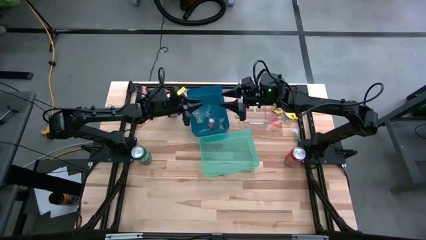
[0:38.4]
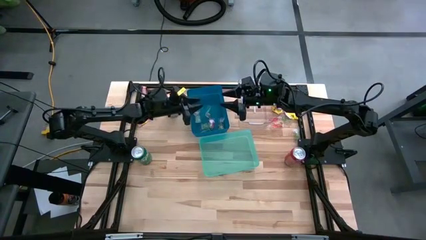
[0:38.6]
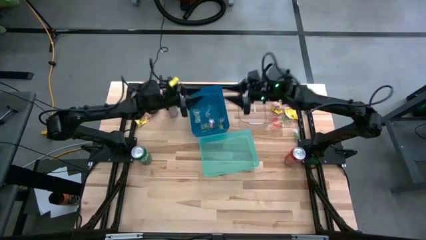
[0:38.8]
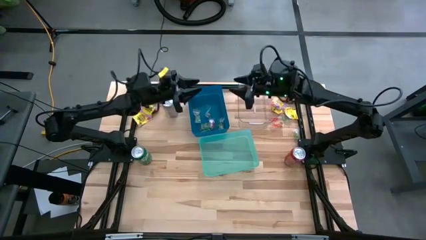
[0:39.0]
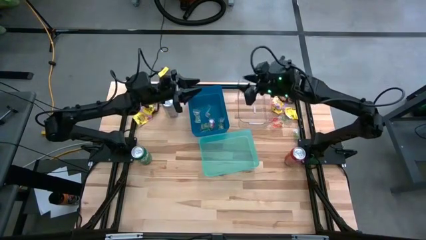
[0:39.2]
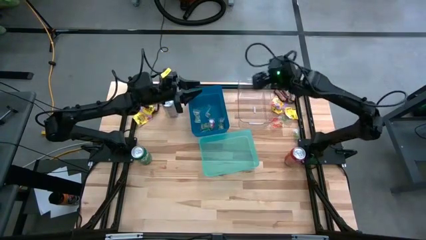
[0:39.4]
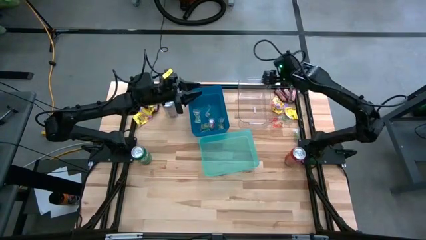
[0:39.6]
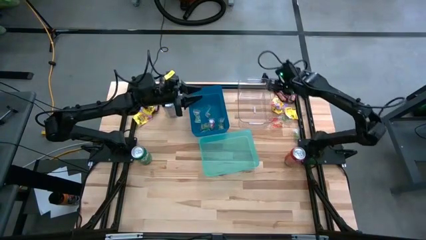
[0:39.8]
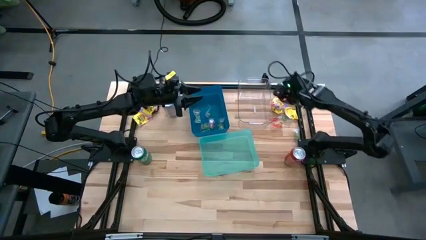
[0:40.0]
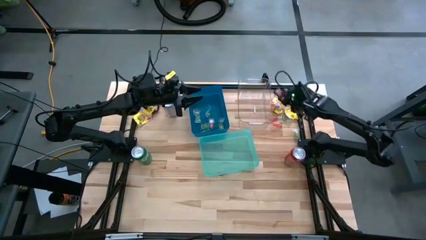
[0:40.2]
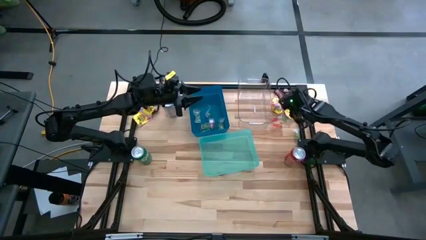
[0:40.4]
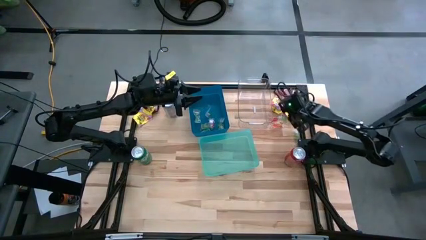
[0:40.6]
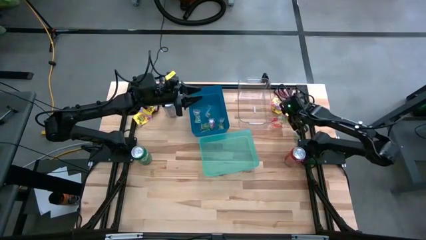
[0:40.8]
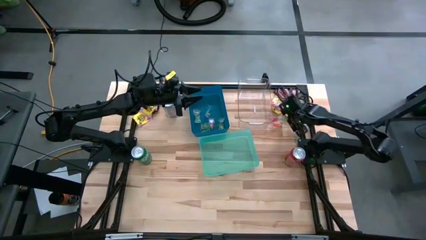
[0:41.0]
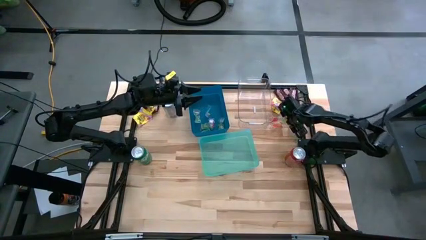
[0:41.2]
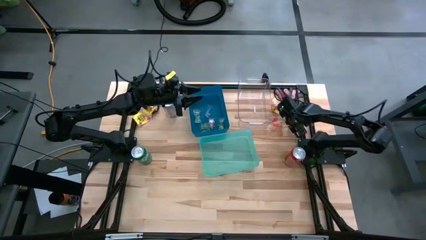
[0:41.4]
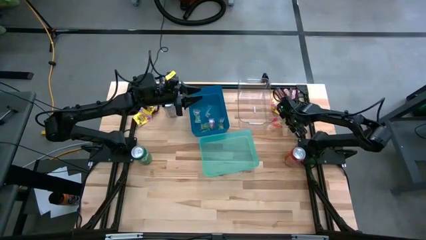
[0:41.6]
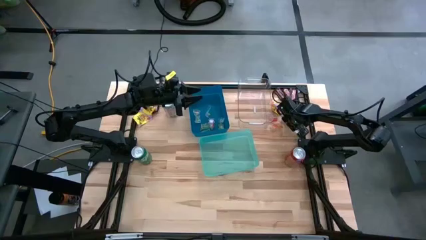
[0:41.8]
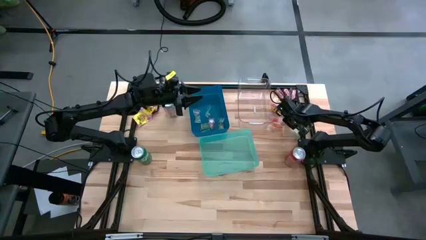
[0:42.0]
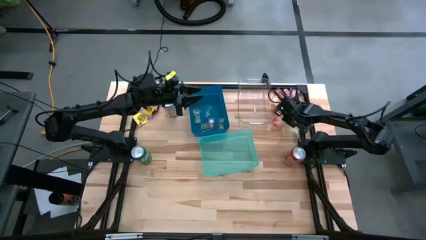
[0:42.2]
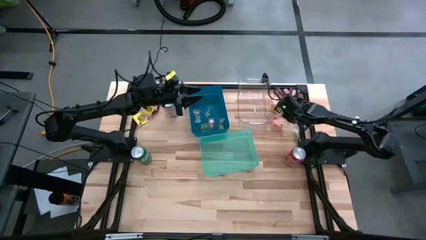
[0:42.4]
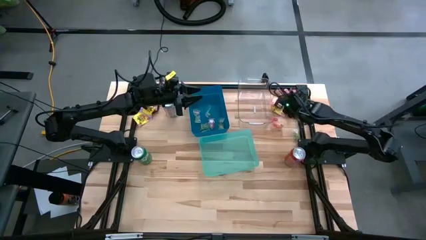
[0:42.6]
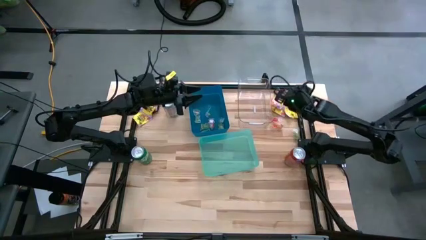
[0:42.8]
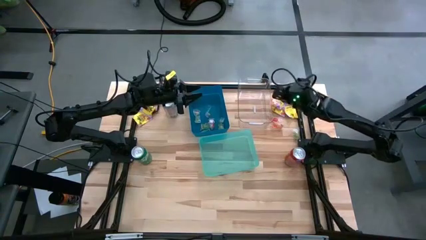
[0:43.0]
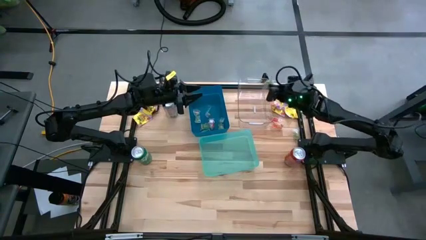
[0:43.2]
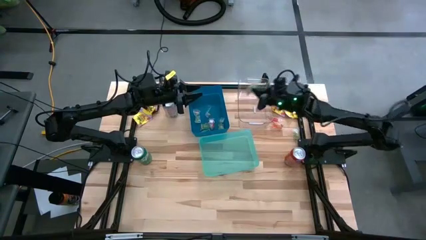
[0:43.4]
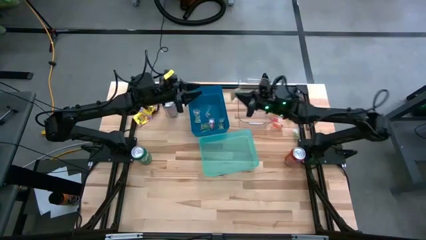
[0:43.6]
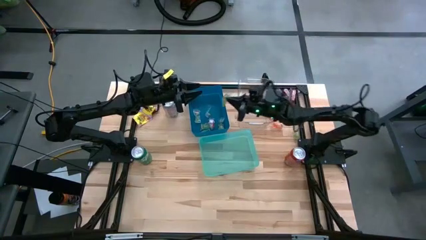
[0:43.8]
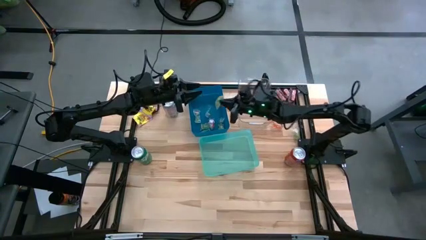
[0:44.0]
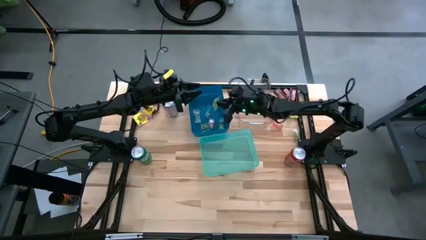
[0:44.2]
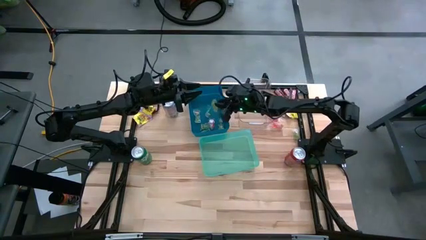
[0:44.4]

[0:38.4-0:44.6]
Task: Sort candy
Put the green candy into the blue bin

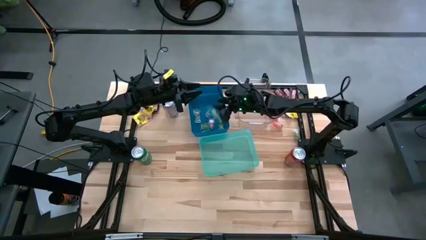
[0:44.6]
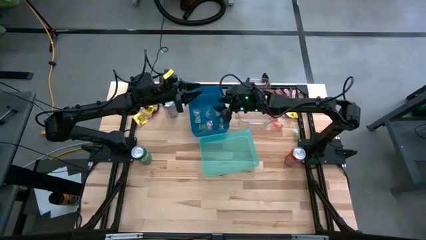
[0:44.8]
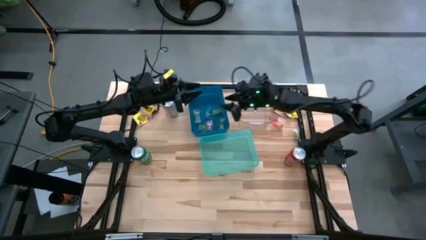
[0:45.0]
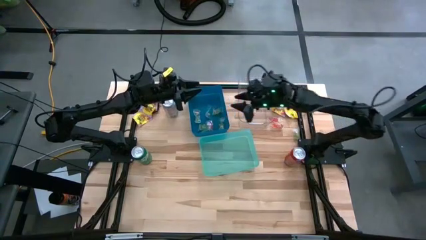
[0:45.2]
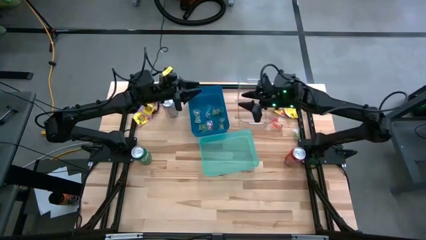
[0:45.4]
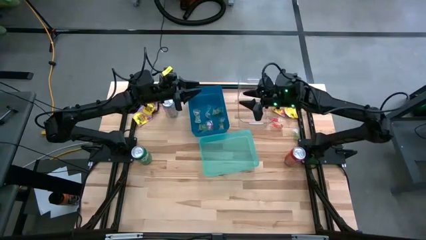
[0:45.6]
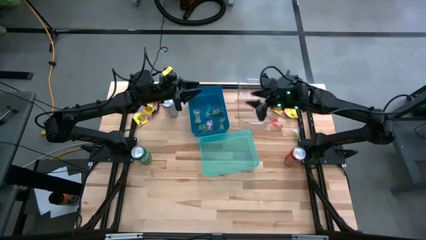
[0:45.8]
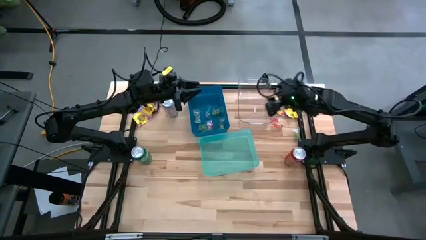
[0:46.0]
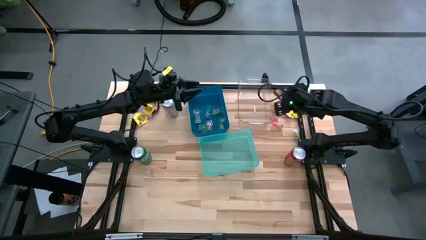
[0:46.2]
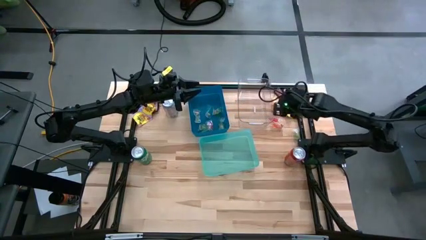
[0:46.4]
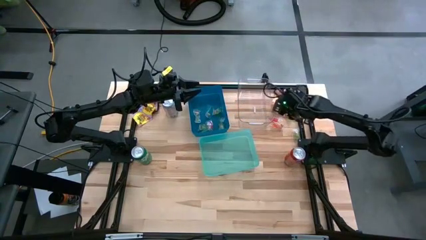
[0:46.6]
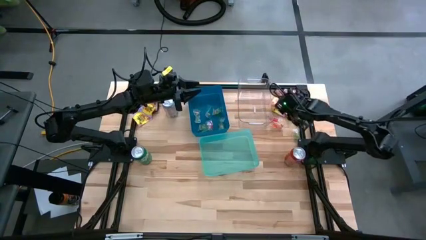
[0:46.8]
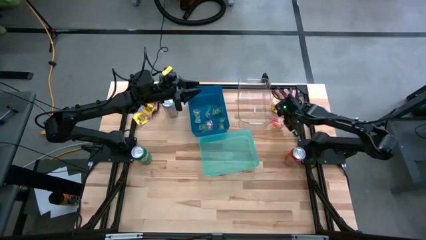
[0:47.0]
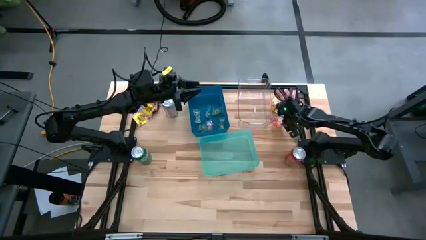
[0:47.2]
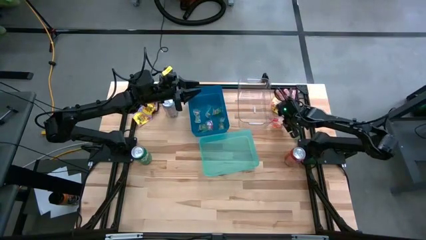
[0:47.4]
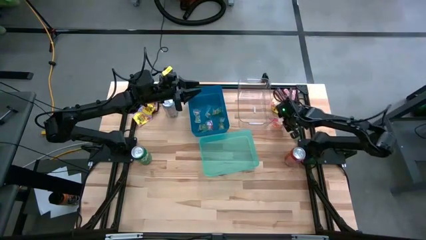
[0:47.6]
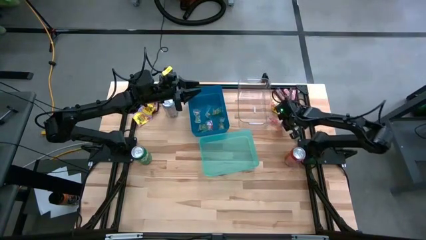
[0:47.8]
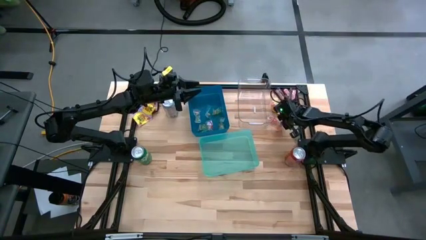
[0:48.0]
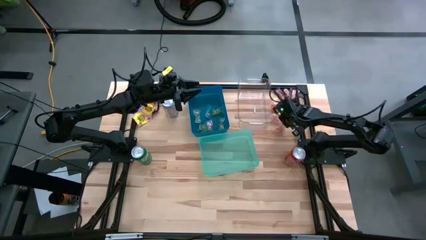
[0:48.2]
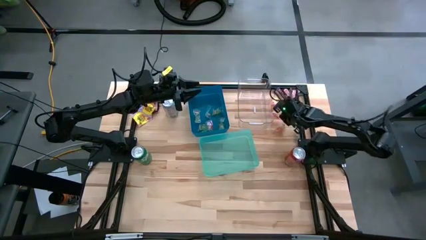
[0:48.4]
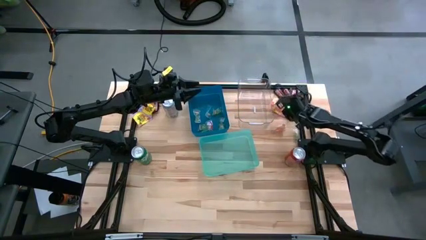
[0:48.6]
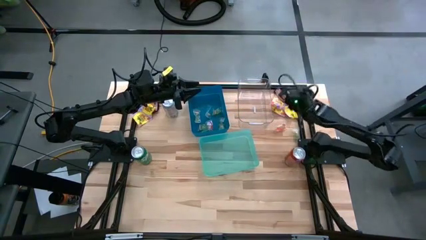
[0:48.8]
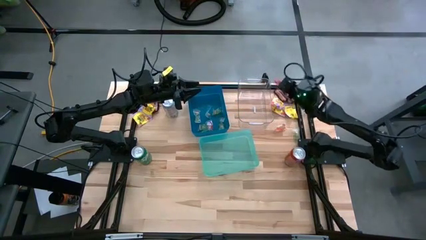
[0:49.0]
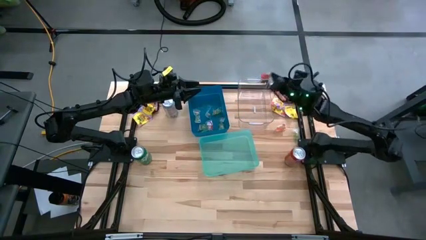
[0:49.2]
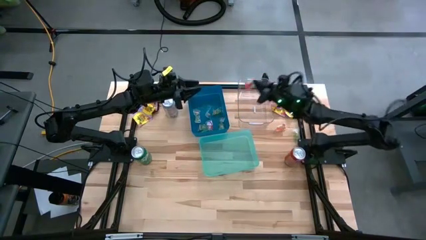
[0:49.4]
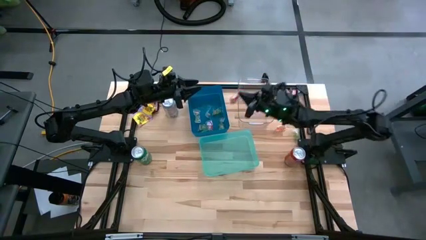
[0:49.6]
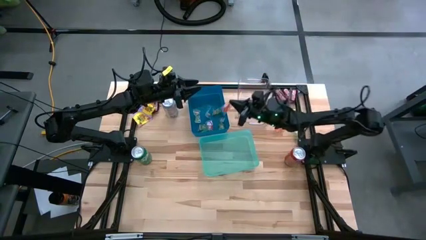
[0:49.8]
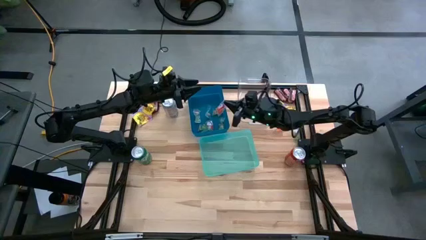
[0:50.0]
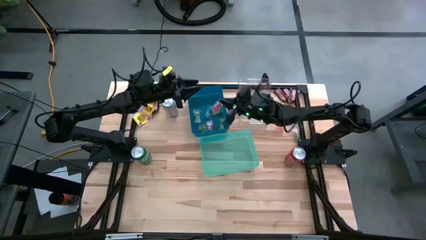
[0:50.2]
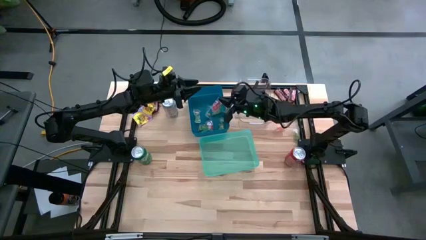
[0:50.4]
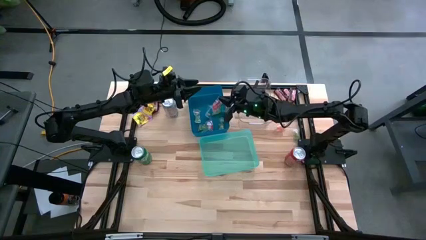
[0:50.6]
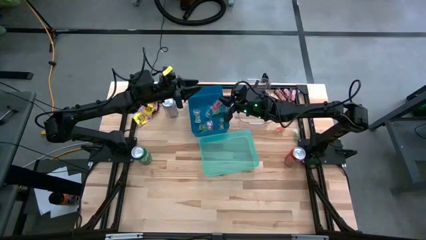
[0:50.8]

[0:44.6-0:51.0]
Put the orange candy into the blue bin

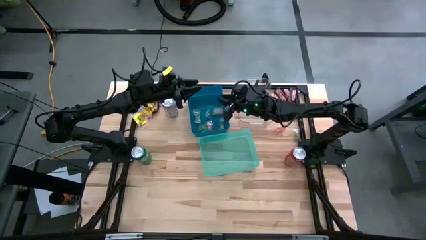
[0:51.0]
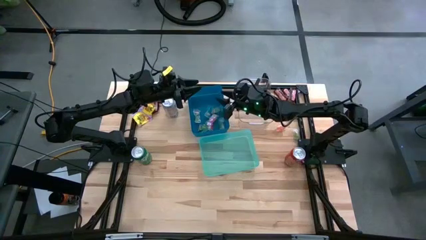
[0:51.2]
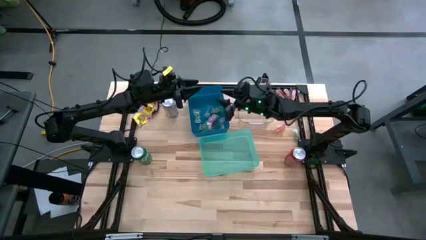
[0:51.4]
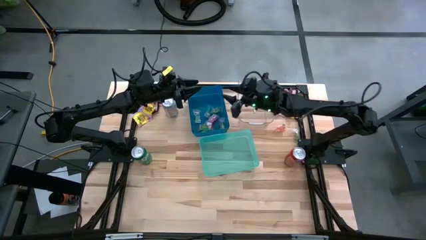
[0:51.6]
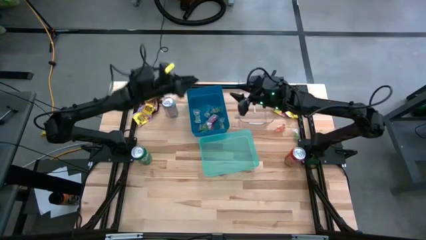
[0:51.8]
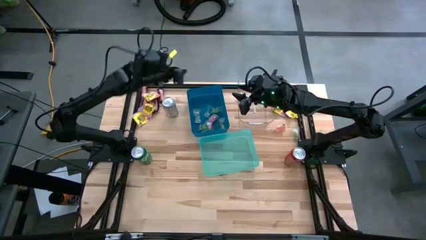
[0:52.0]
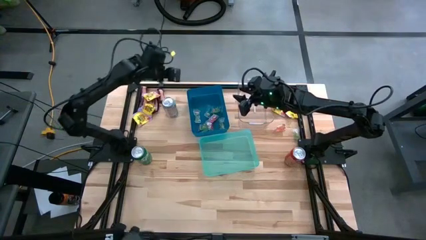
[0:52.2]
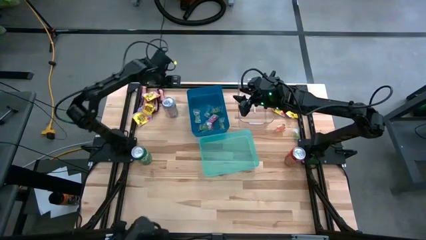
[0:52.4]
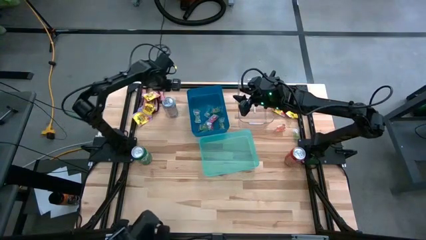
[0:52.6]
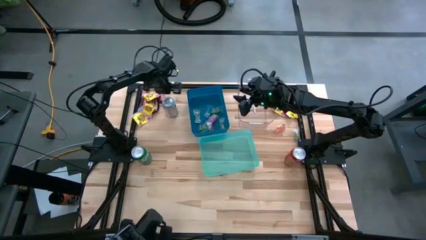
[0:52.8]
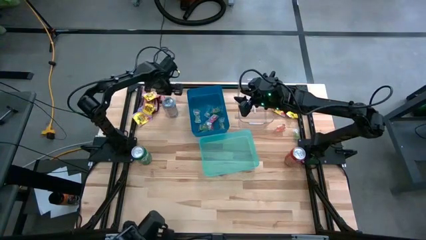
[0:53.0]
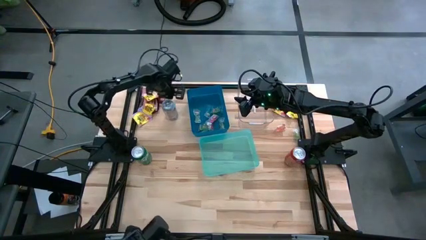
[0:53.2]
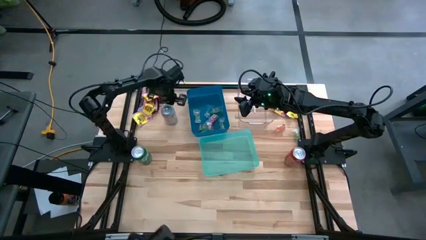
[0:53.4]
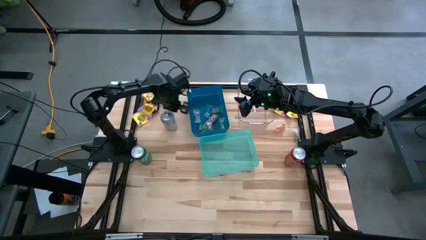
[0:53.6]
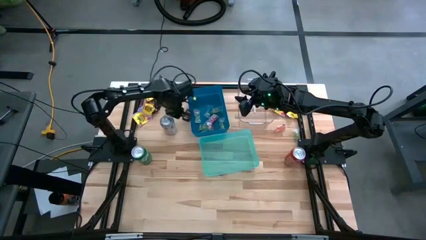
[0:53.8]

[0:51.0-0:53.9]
Adjust the white soda can

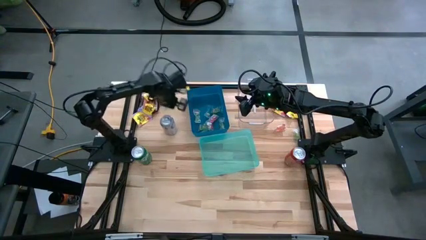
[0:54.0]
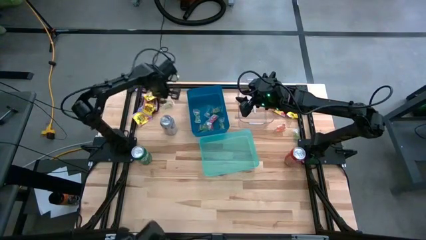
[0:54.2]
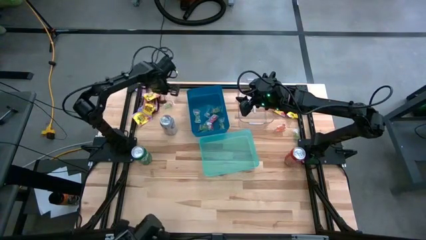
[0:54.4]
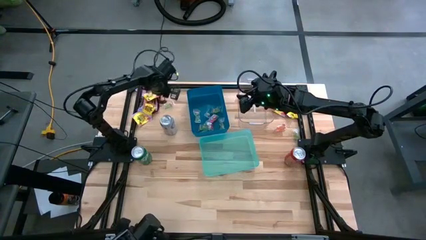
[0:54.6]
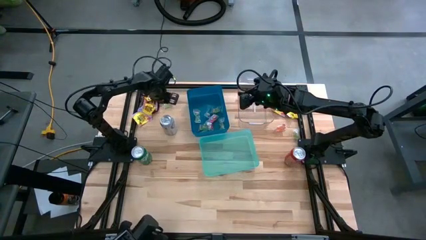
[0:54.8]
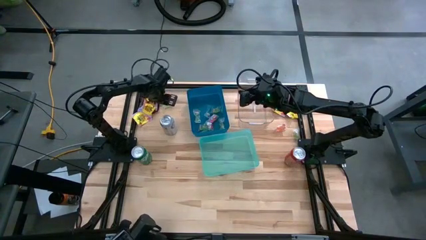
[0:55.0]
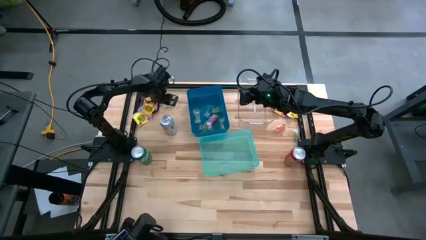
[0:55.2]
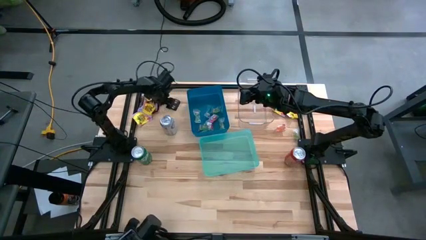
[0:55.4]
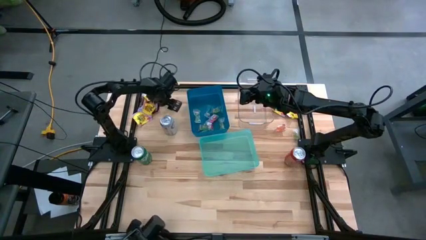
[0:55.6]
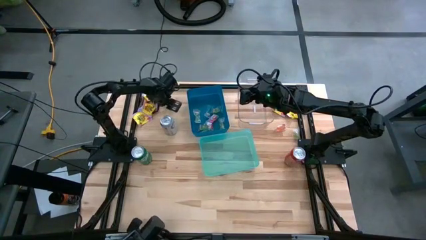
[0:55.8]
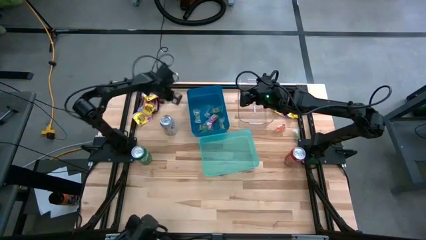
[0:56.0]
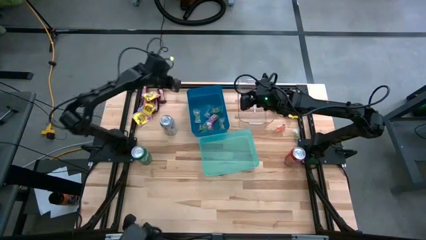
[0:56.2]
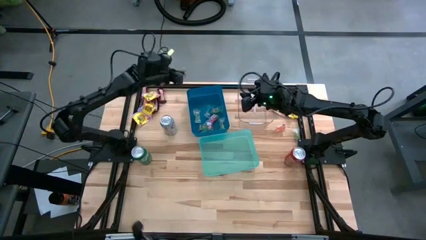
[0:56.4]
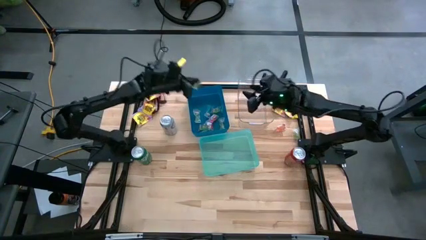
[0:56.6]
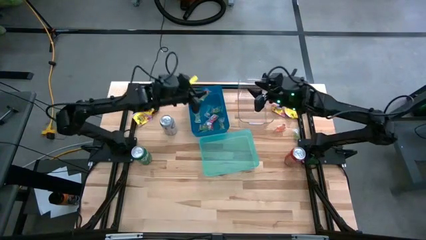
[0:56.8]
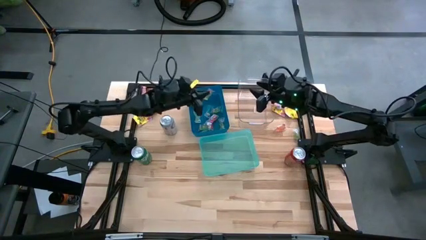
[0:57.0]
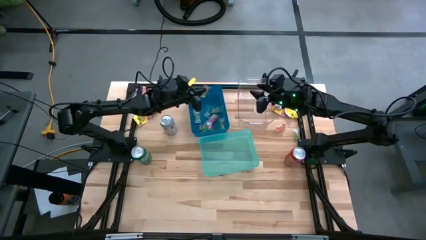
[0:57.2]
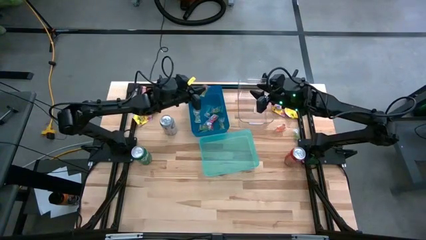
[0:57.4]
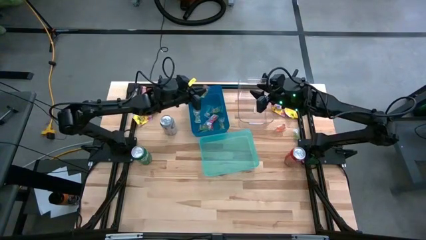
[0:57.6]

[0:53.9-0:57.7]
Put the green candy into the blue bin
